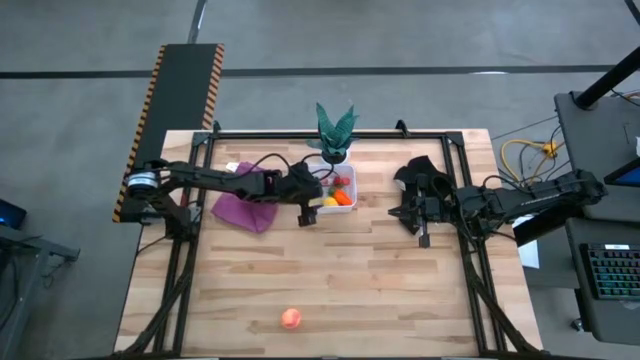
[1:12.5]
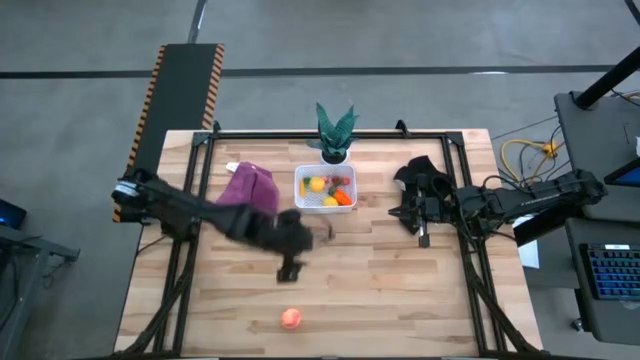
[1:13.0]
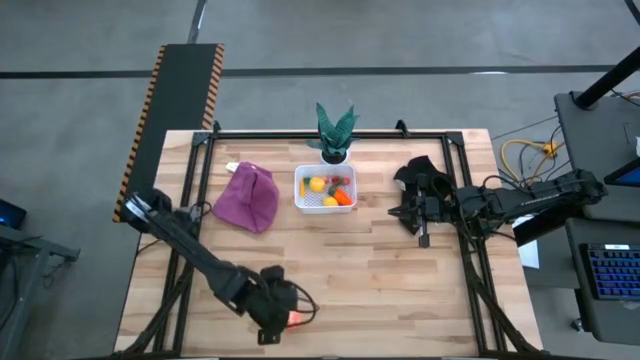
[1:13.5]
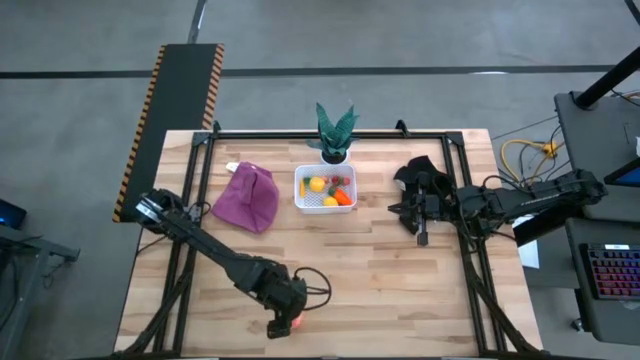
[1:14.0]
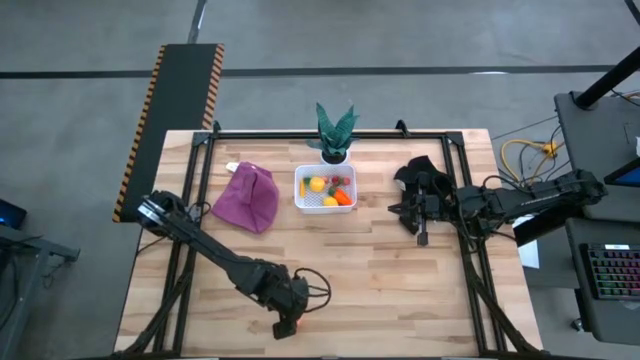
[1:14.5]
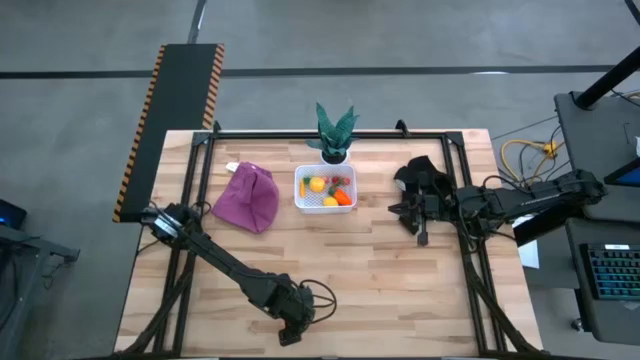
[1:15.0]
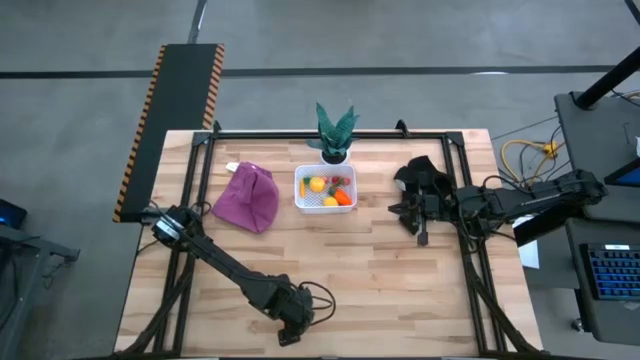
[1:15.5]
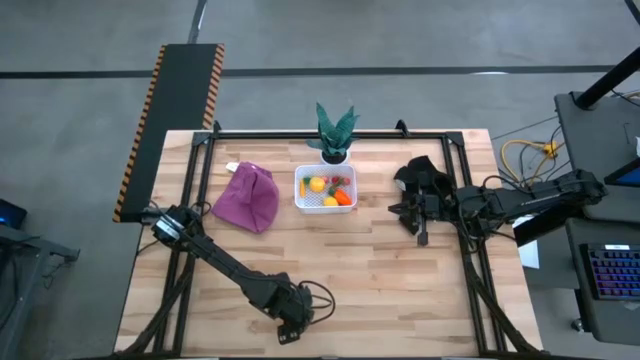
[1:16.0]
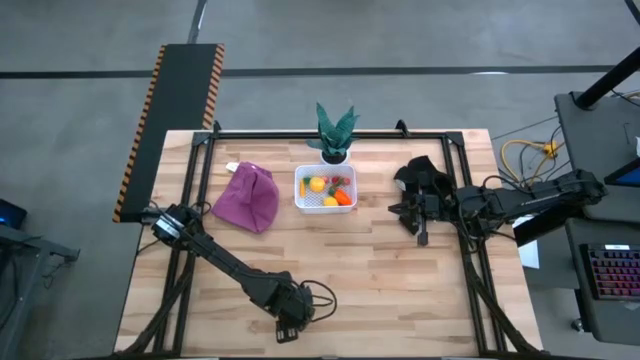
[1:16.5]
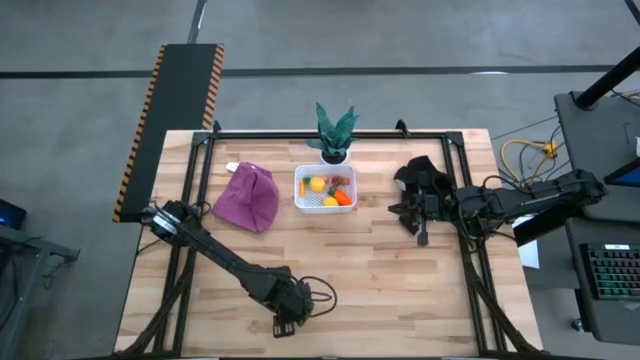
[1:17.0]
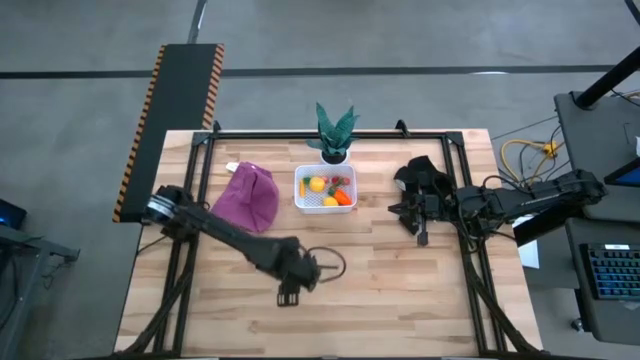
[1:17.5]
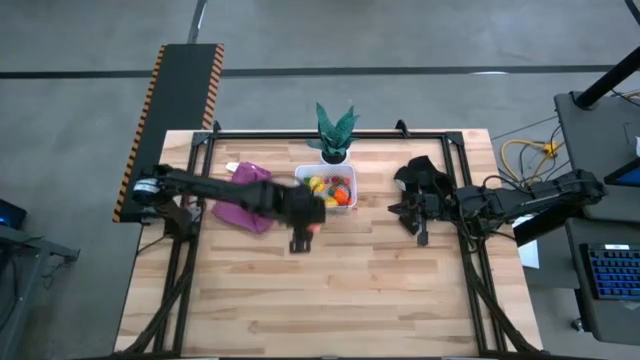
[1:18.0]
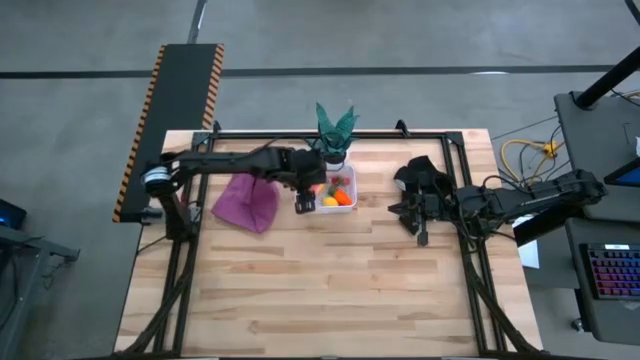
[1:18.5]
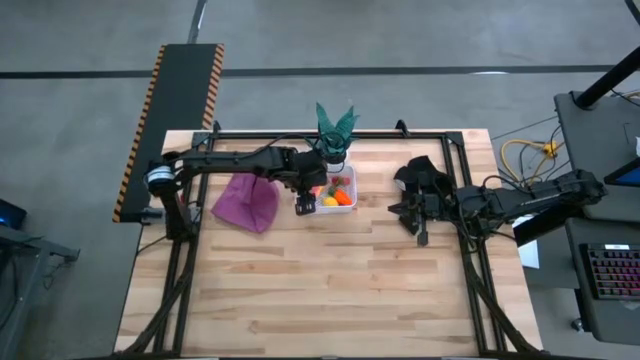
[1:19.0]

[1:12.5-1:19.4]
Task: Build produce basket
Put the peach into the white basket

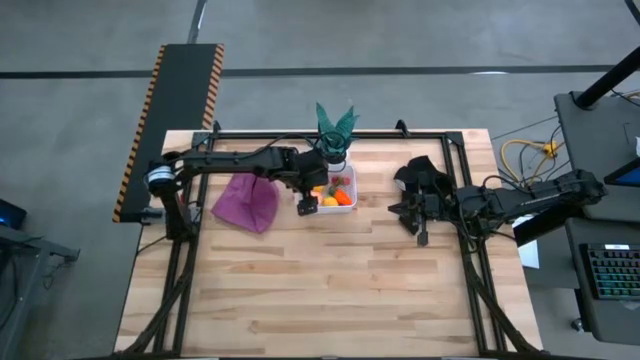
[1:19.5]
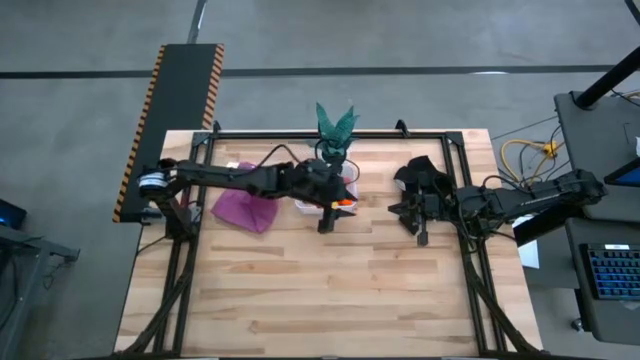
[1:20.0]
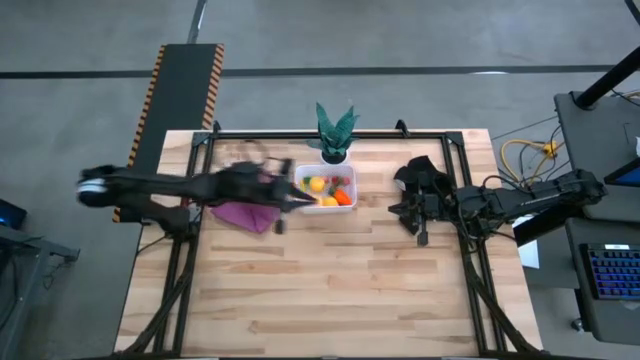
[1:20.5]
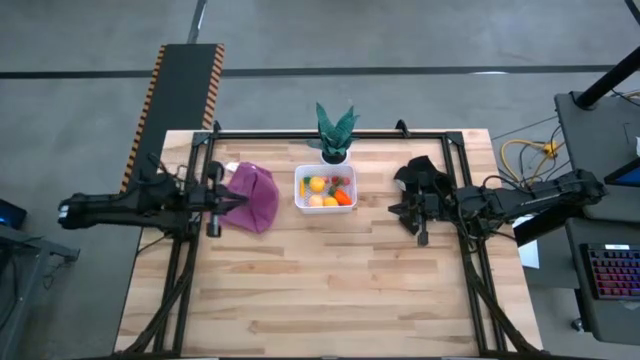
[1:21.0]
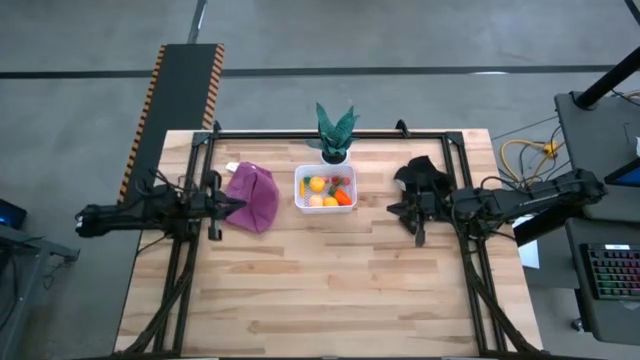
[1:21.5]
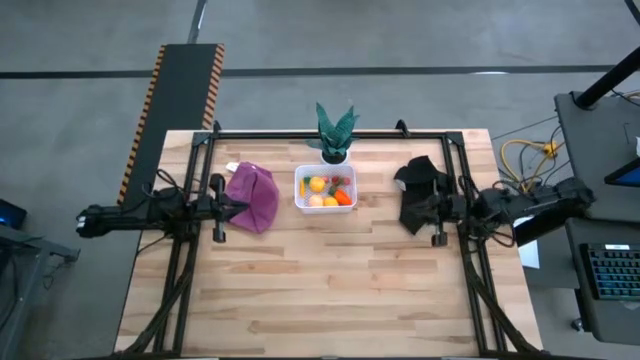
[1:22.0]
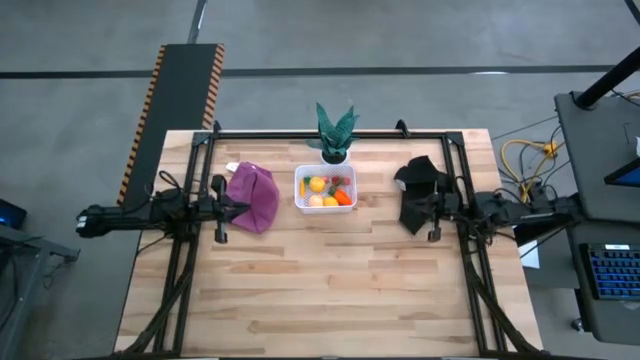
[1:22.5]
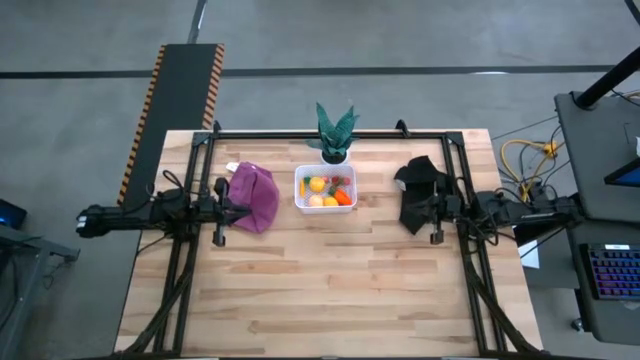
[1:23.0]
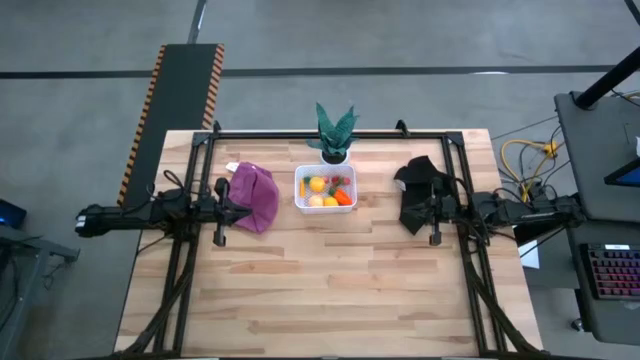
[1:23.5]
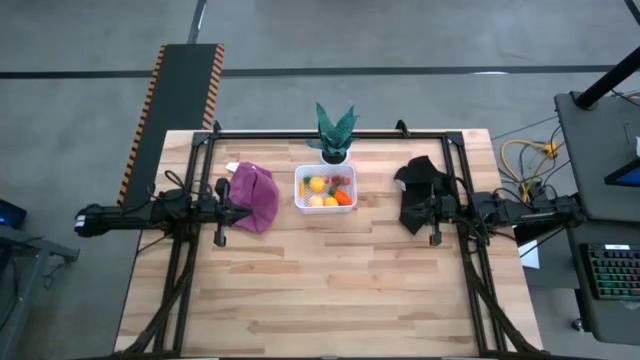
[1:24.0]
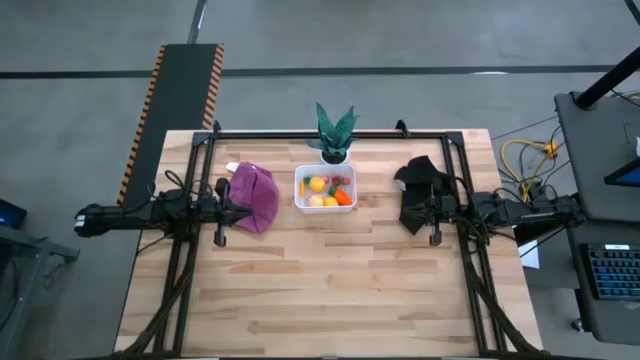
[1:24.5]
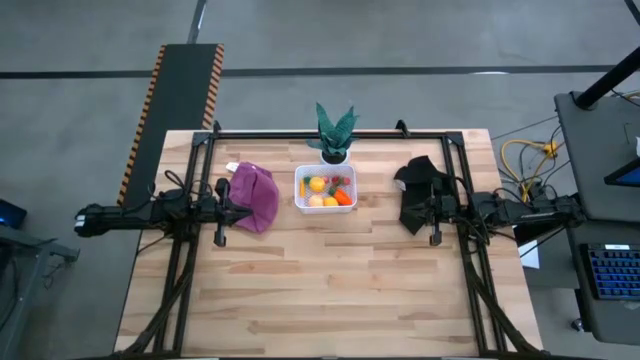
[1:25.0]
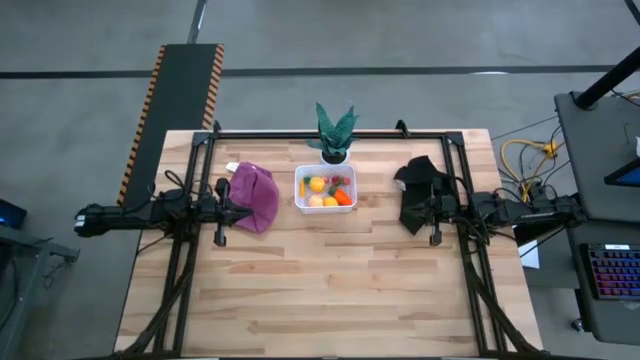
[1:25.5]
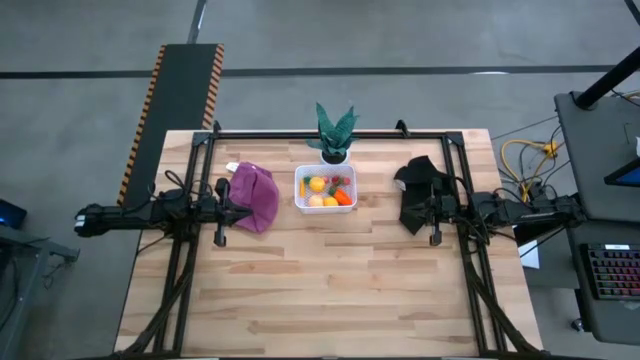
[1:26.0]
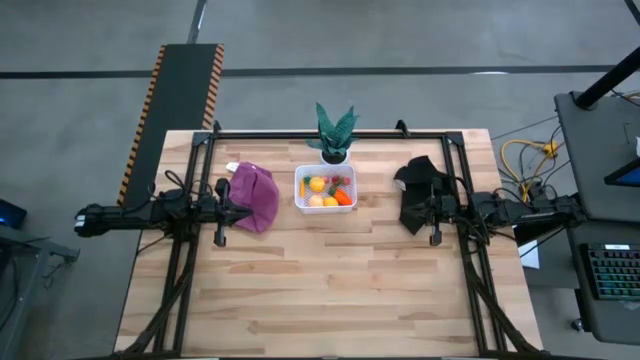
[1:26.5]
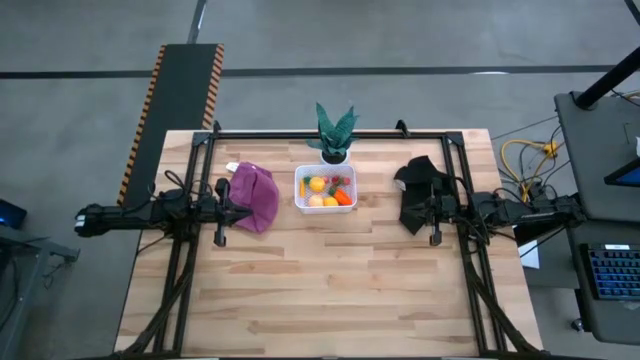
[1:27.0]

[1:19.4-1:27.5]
Return to Home Position

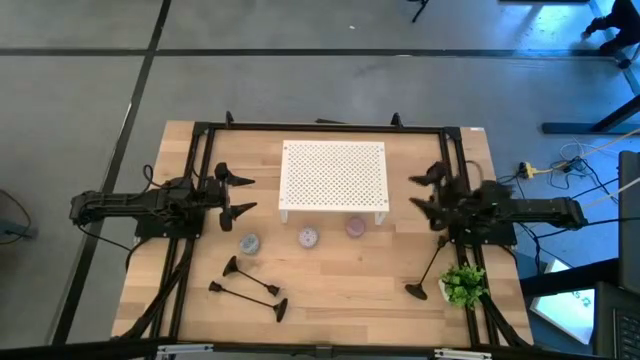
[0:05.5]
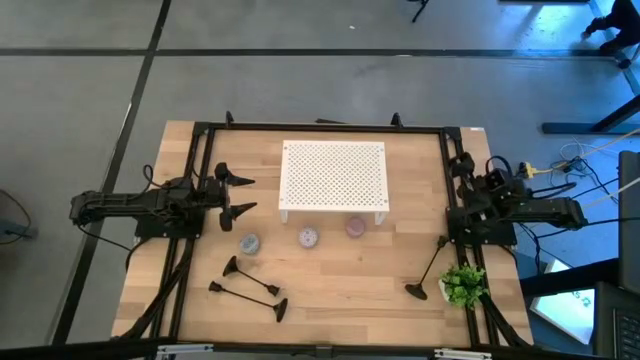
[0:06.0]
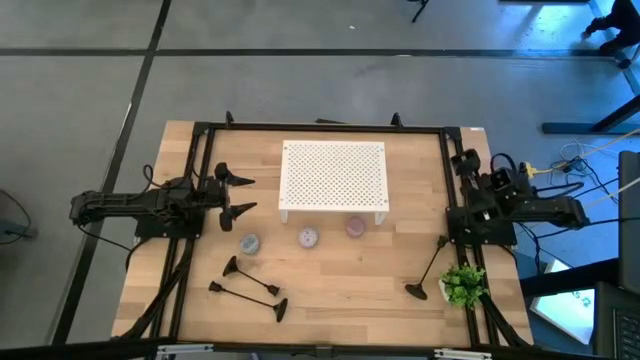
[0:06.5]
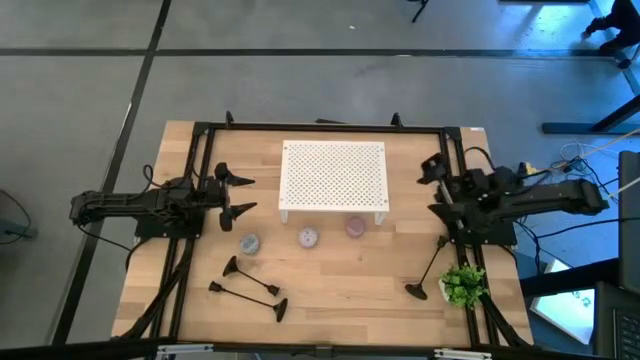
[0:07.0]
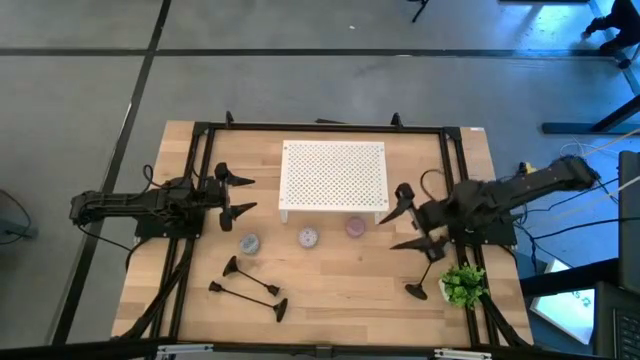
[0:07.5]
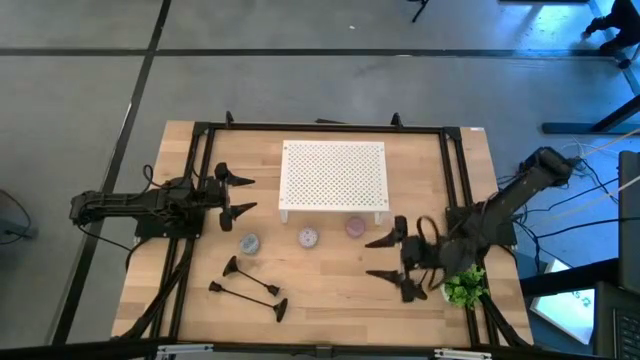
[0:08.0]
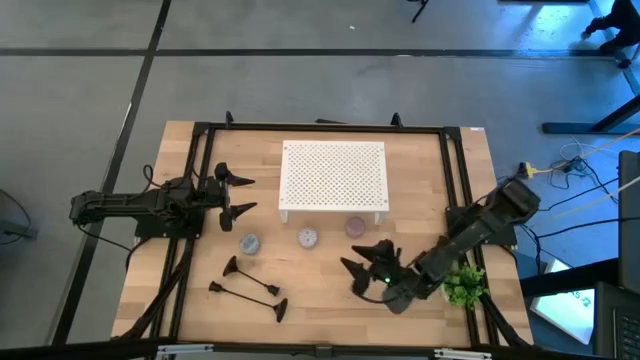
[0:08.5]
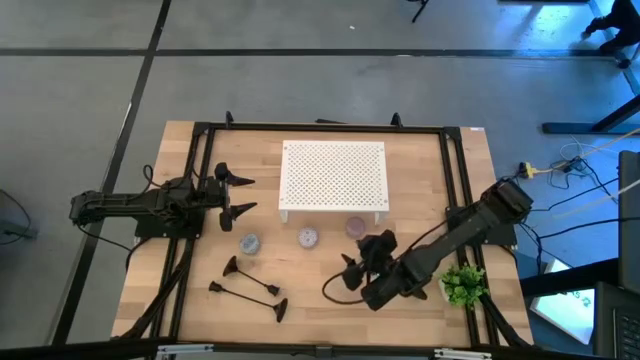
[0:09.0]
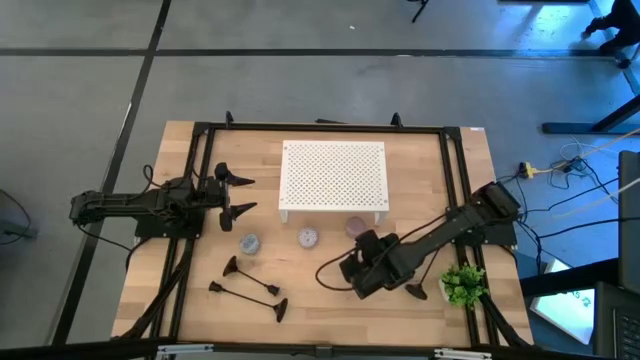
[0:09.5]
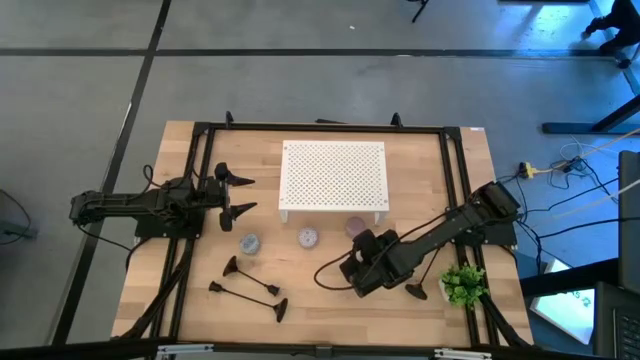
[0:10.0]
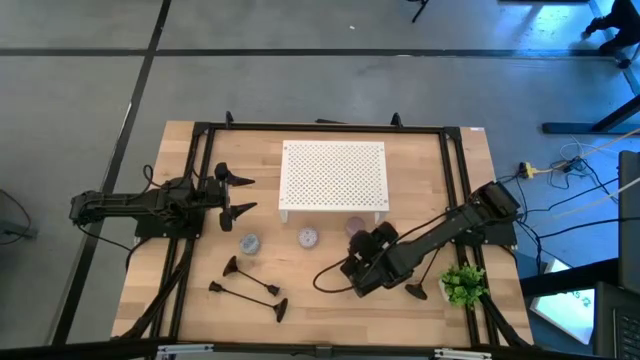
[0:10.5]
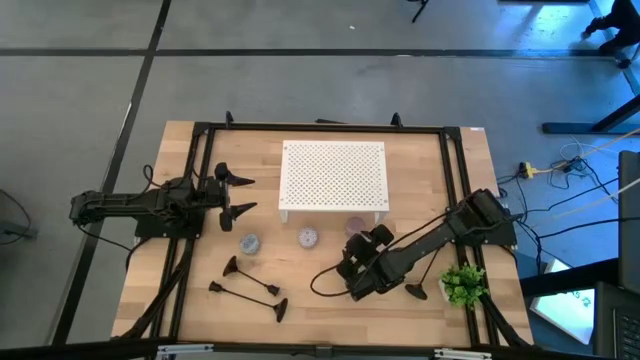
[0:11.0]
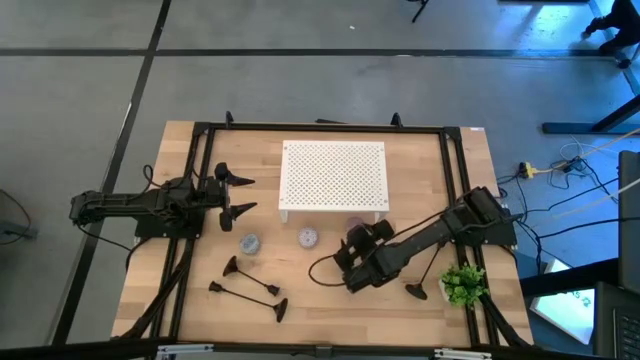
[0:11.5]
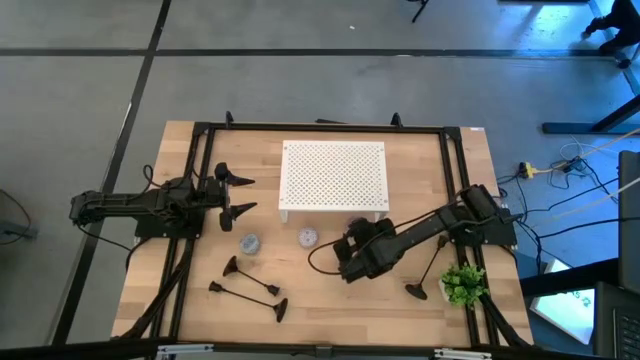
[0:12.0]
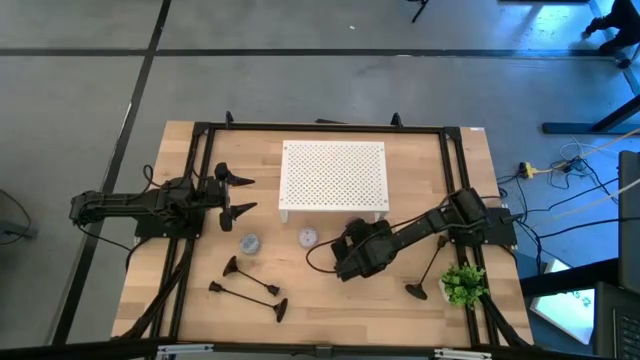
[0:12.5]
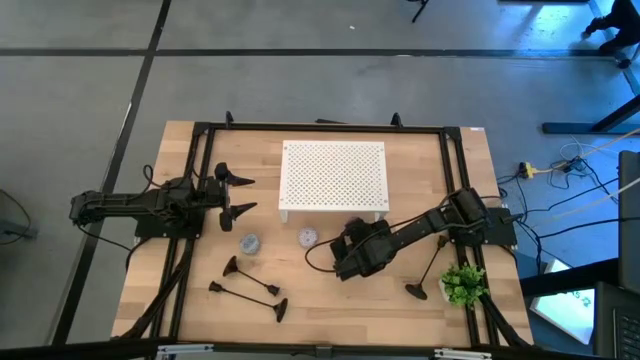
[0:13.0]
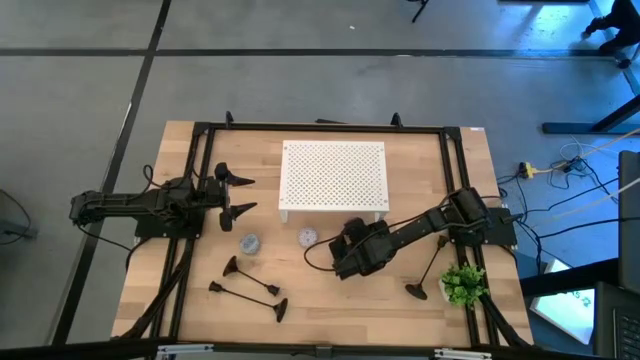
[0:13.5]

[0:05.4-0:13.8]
Task: Pick & Place candle stick holders
Put the pink scented candle on the shelf
